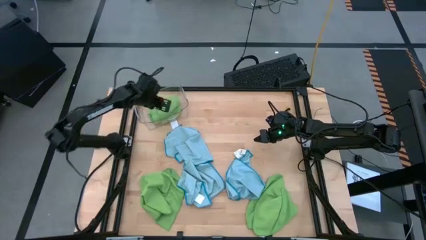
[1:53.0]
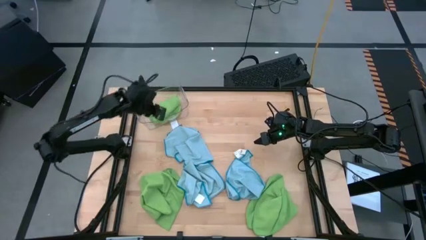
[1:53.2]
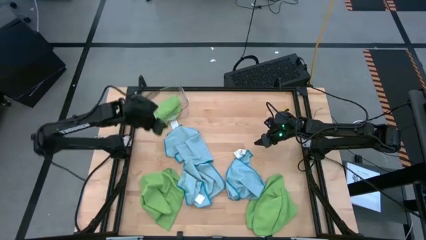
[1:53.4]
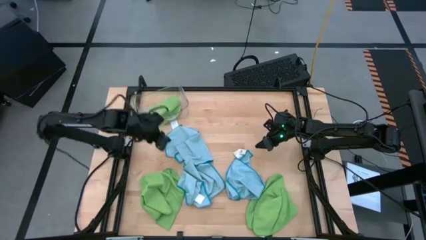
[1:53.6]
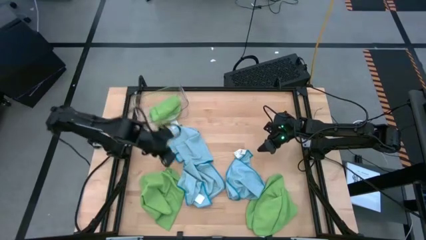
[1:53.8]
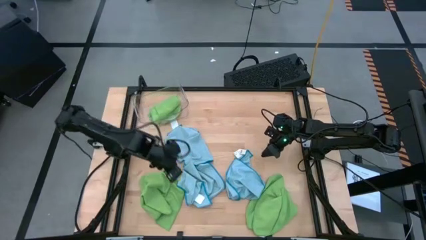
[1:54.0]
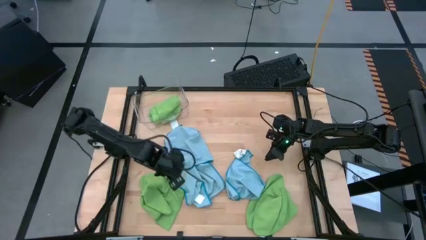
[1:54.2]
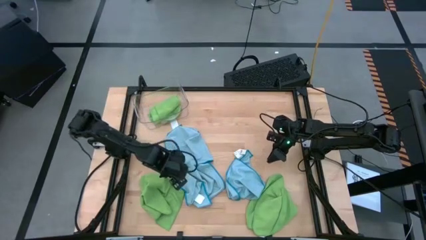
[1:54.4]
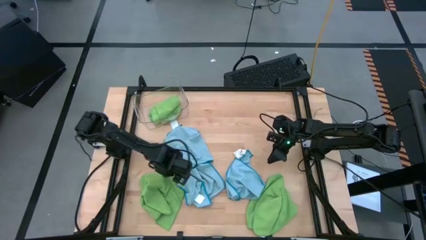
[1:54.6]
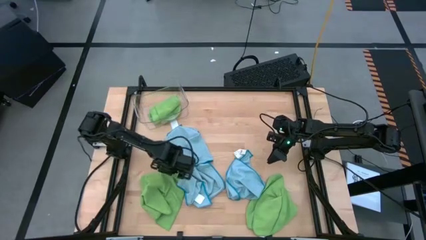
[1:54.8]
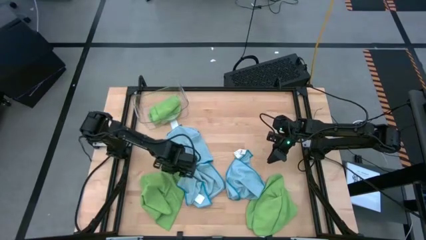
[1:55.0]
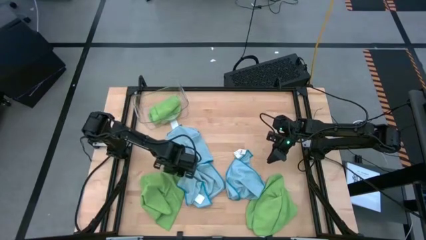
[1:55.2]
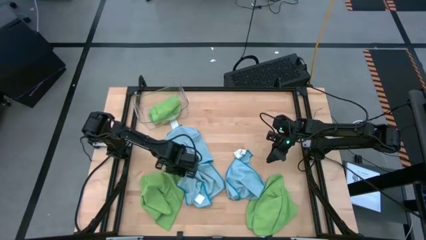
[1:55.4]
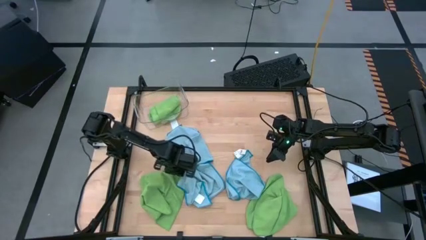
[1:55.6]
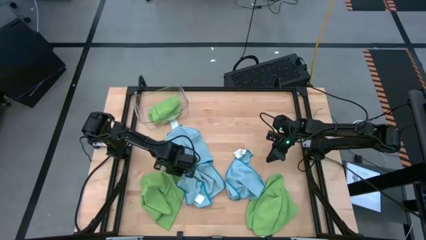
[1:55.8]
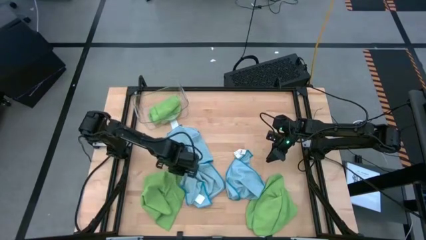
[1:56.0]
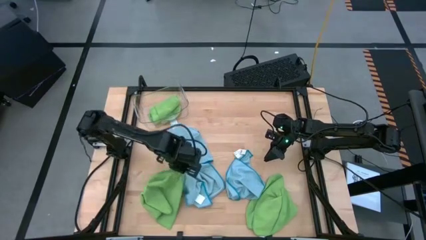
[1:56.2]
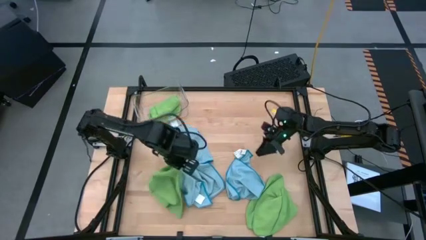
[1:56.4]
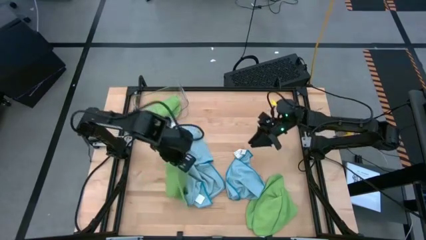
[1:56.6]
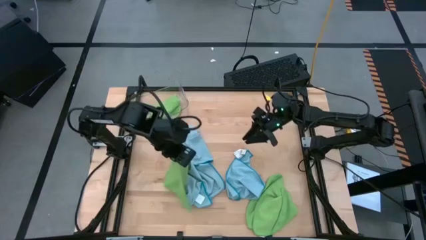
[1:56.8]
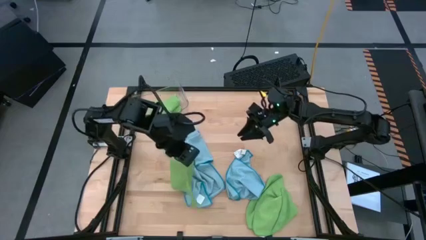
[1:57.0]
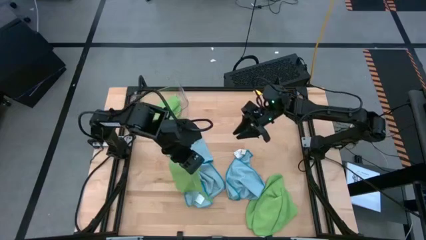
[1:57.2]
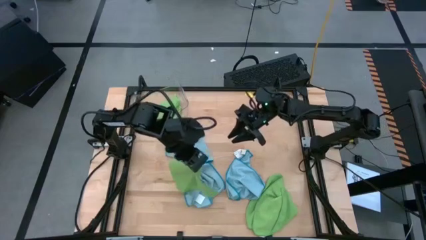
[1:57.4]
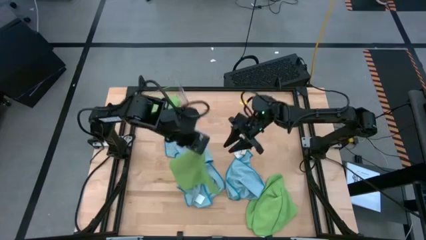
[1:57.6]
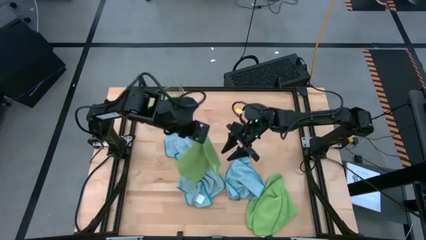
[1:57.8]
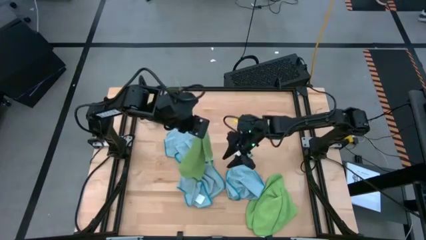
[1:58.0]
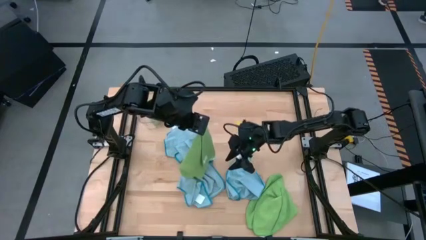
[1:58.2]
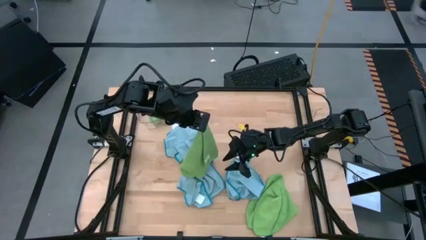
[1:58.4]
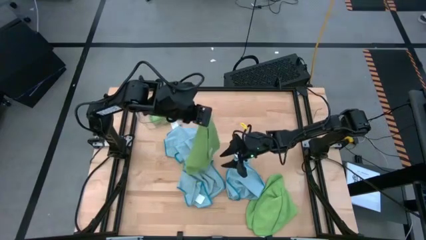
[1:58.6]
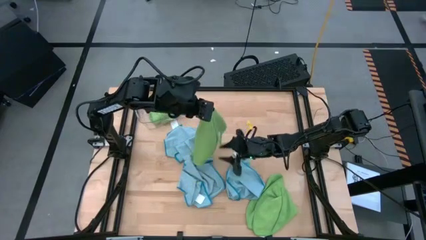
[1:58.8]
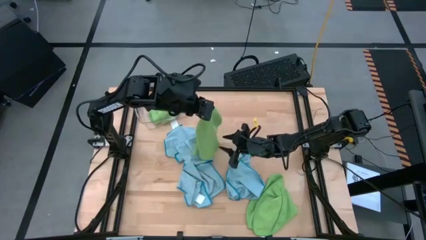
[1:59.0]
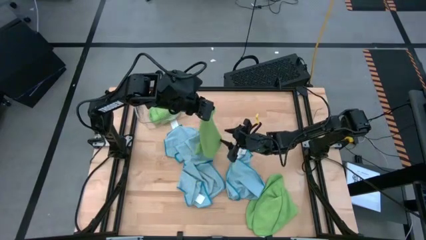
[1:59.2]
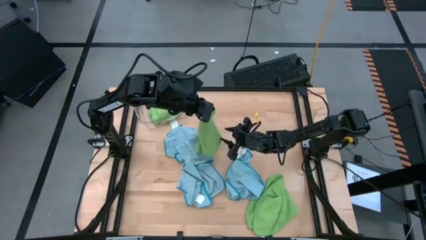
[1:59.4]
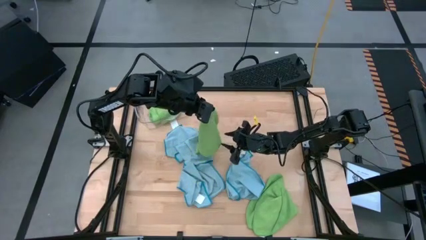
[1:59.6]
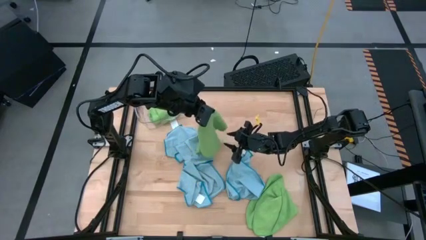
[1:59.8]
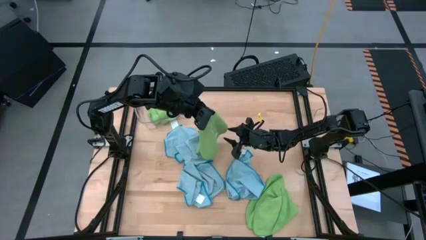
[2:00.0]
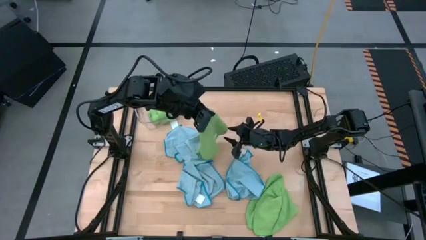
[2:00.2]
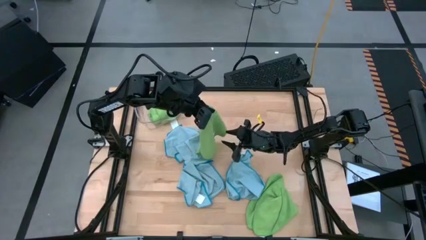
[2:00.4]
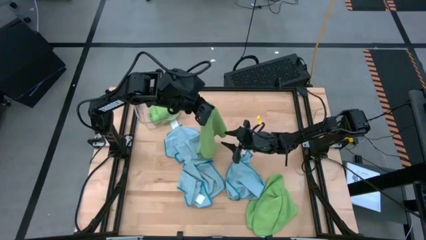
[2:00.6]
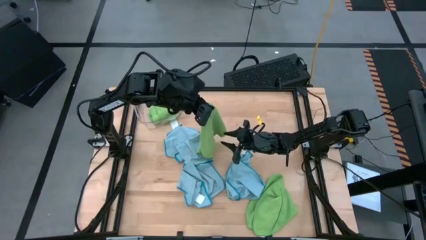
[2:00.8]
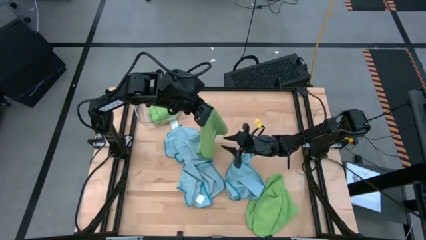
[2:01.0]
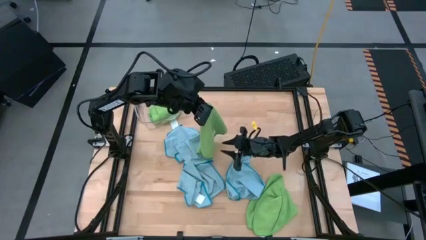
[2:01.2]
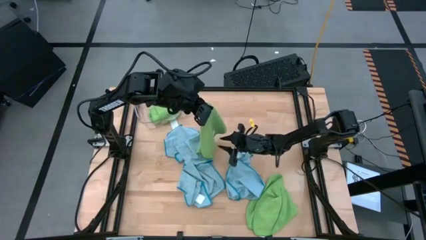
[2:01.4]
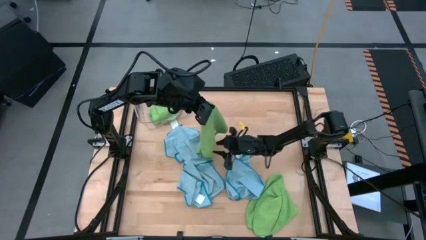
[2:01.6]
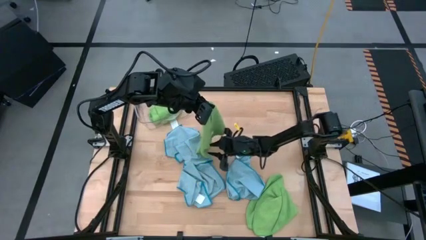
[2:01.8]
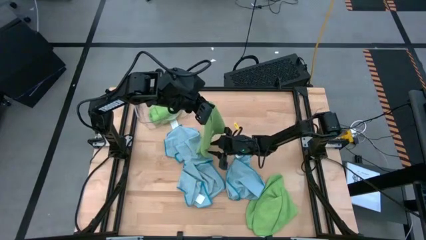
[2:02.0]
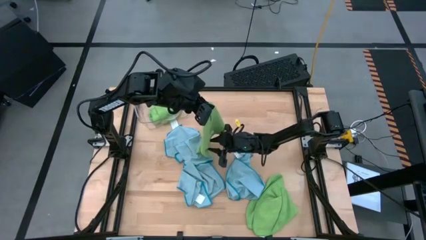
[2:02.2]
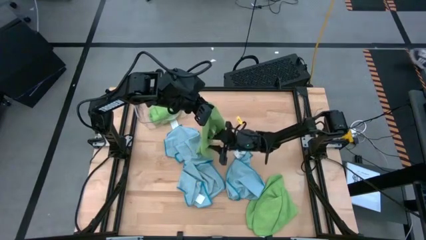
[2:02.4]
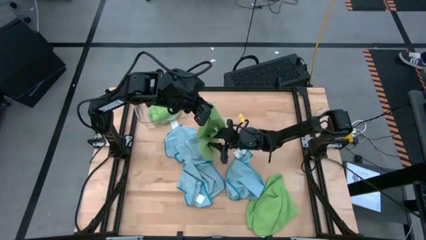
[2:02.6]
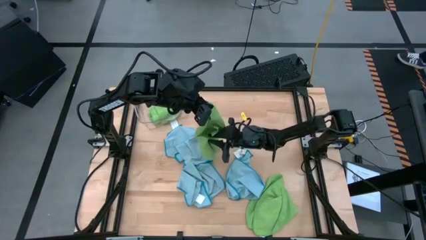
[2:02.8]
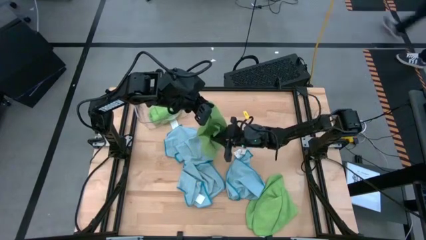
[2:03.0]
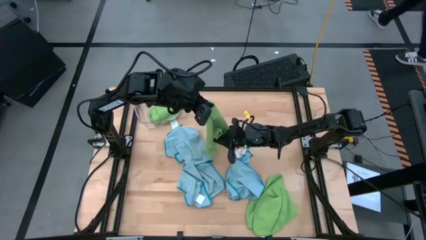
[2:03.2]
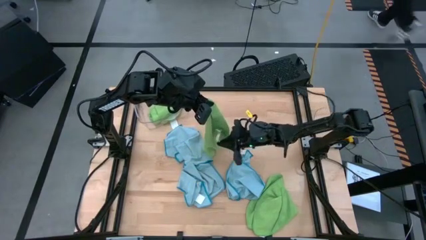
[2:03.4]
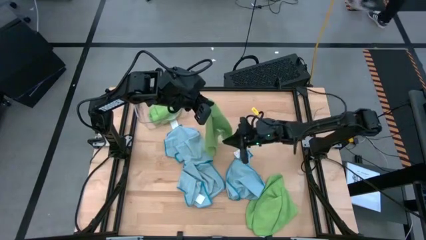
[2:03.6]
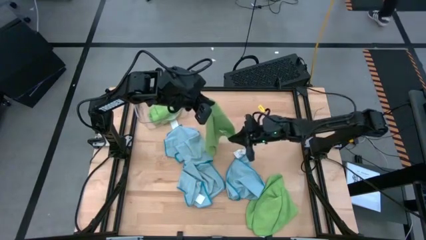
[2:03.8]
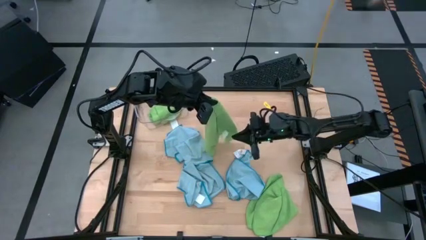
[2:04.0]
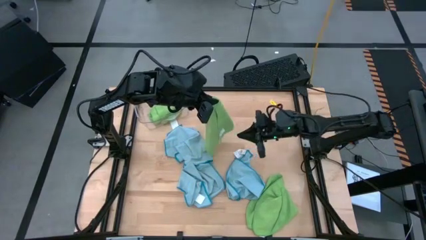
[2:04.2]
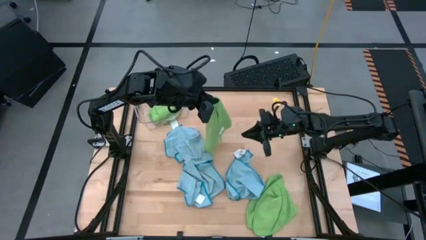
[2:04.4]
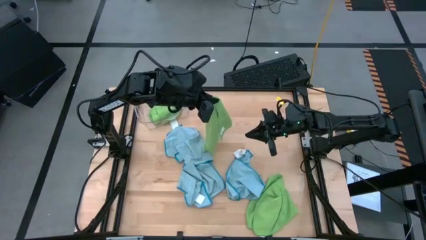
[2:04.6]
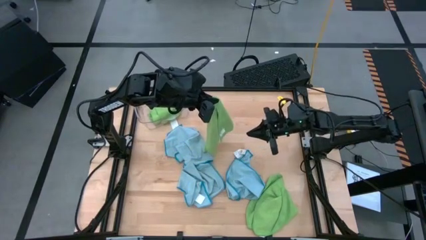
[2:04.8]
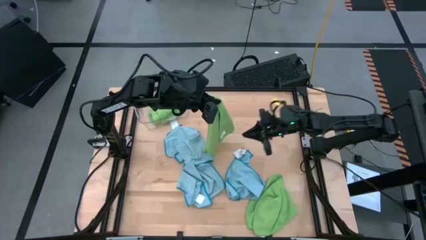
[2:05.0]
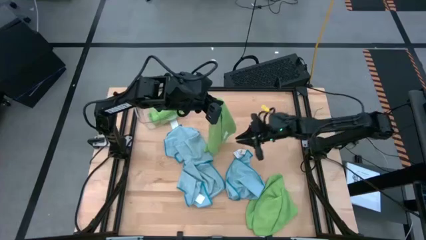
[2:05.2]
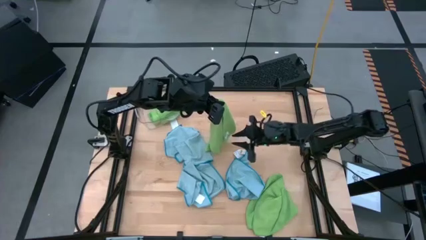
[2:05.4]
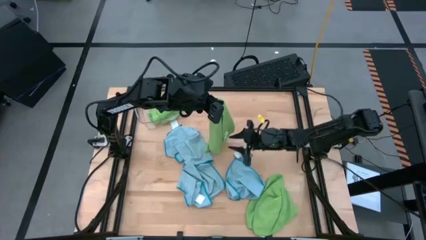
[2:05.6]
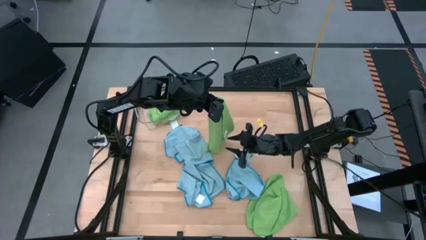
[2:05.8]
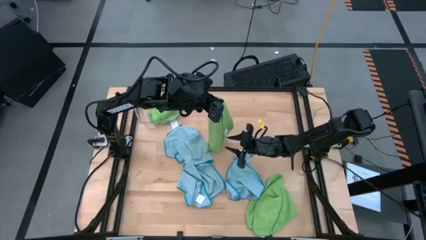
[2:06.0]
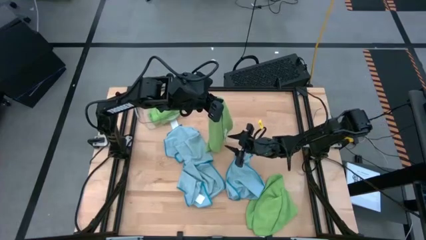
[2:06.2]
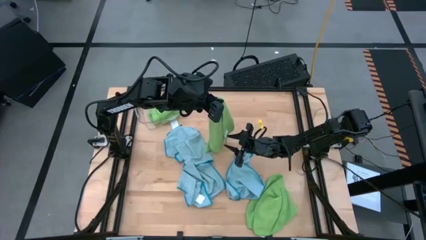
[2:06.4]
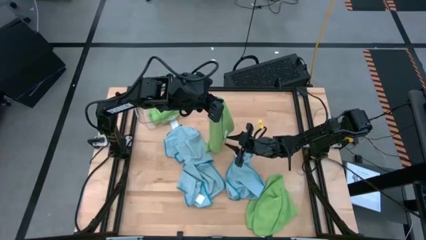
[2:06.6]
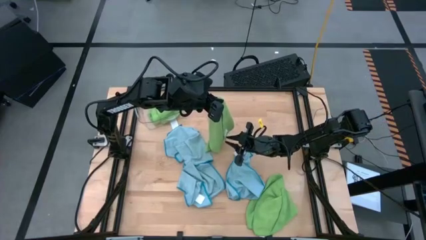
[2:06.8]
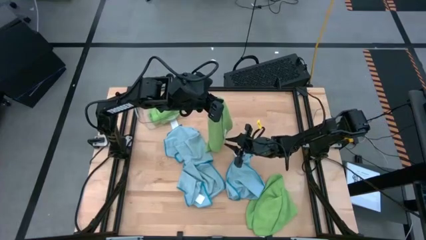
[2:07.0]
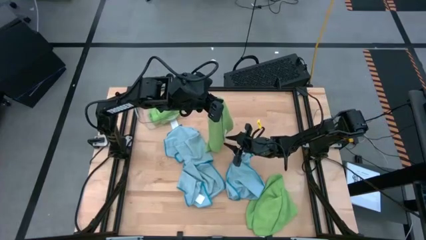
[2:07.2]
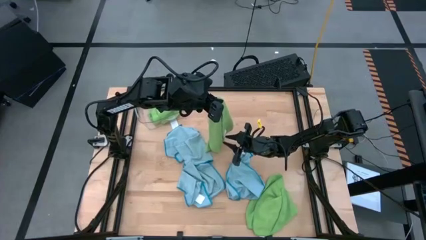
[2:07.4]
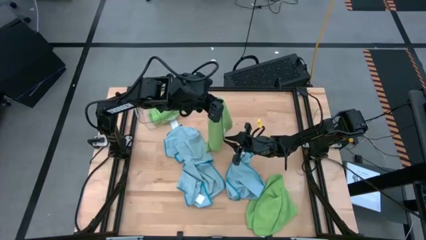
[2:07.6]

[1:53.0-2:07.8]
Task: Fold microfiber towels
Fold the left green microfiber cloth
